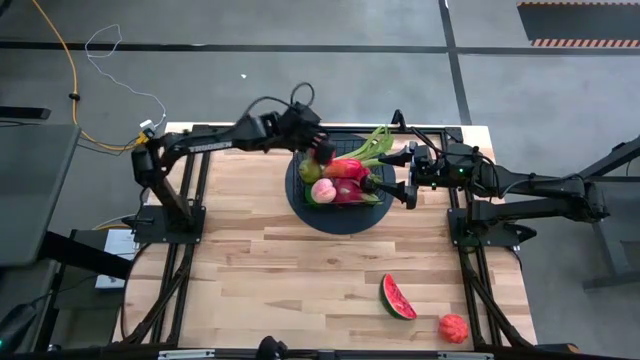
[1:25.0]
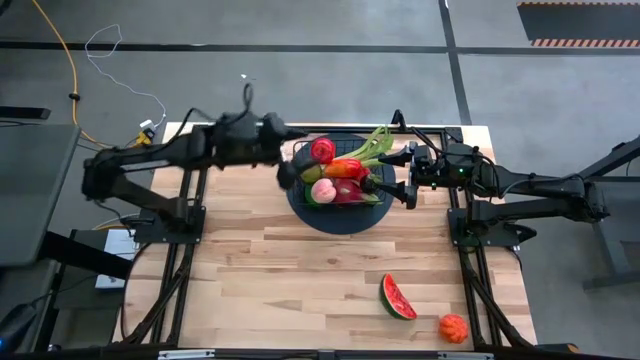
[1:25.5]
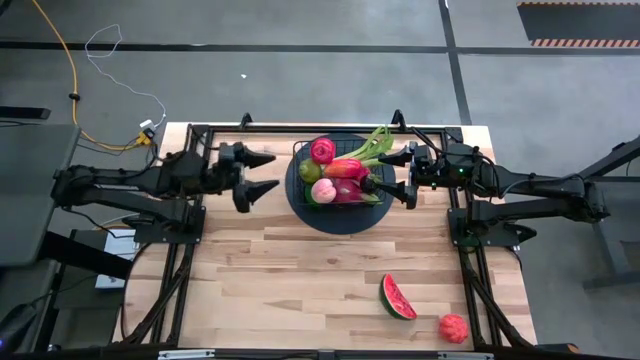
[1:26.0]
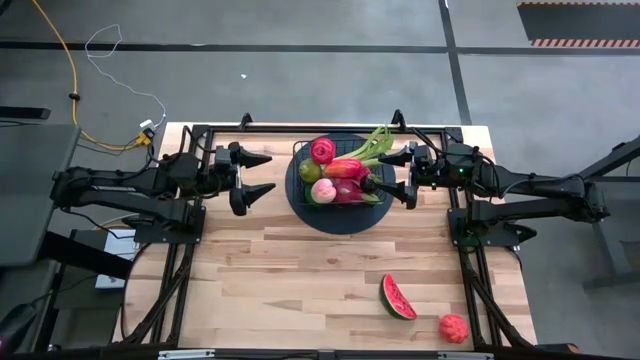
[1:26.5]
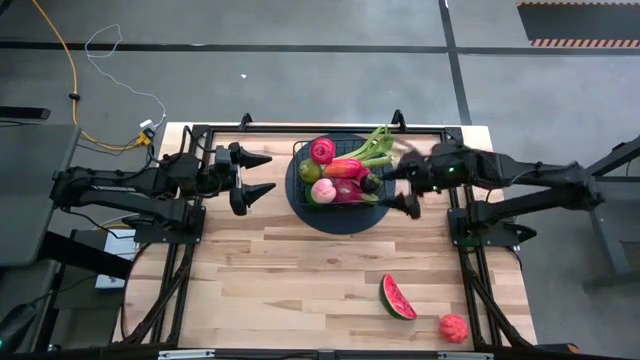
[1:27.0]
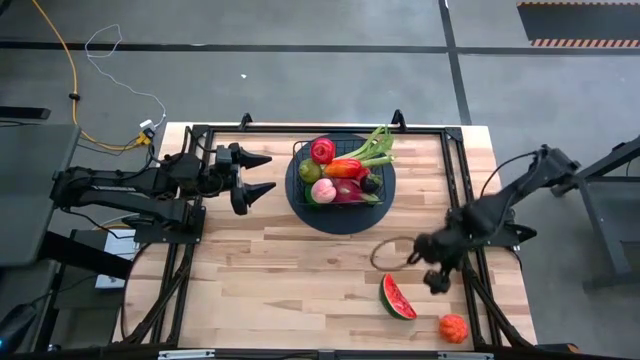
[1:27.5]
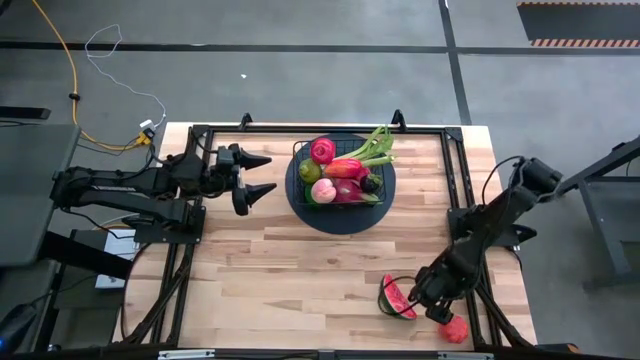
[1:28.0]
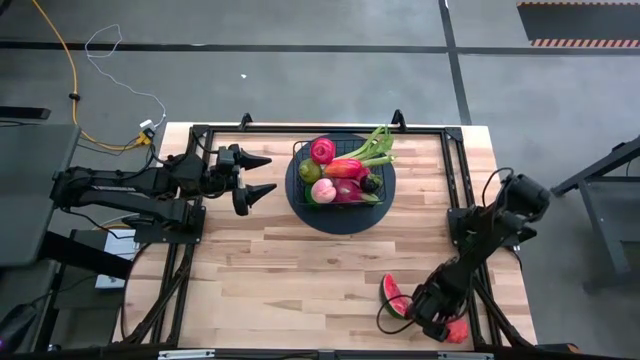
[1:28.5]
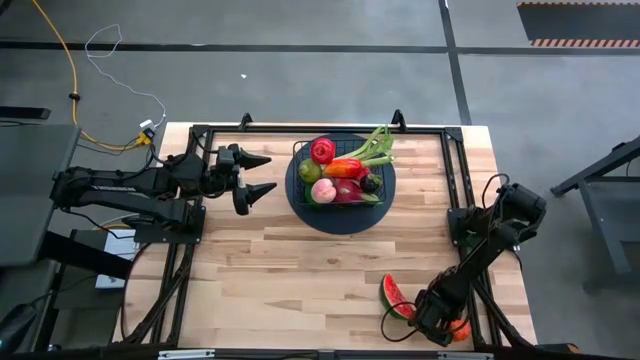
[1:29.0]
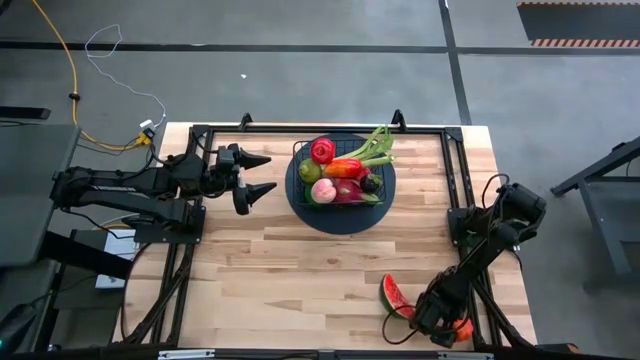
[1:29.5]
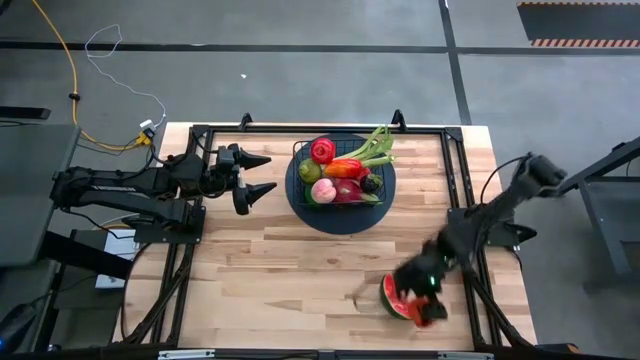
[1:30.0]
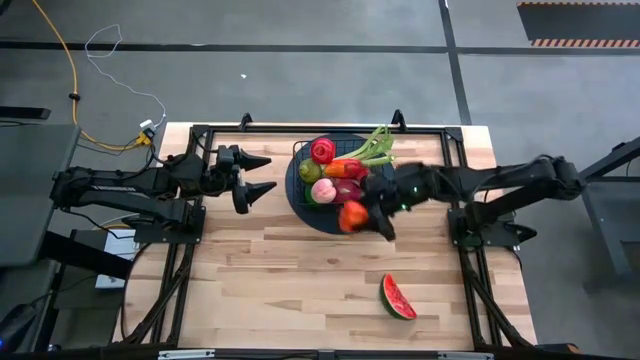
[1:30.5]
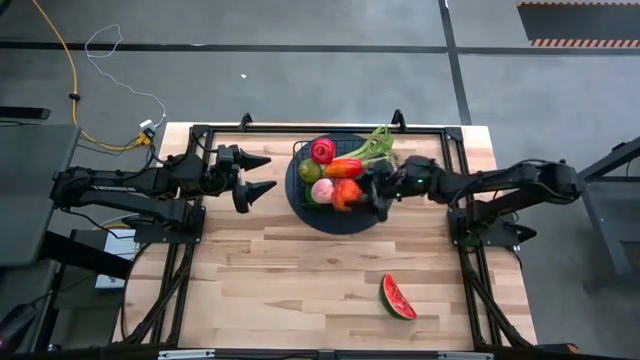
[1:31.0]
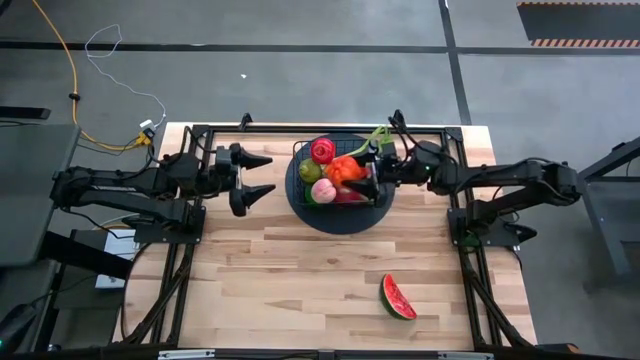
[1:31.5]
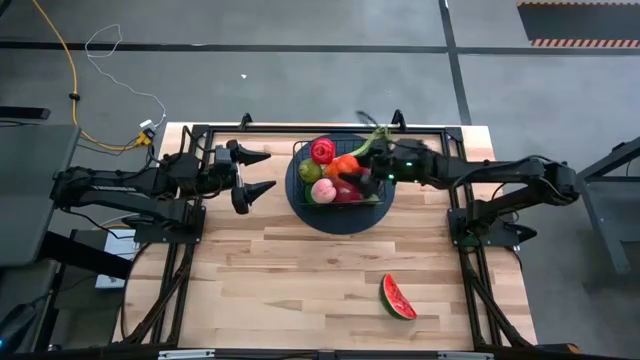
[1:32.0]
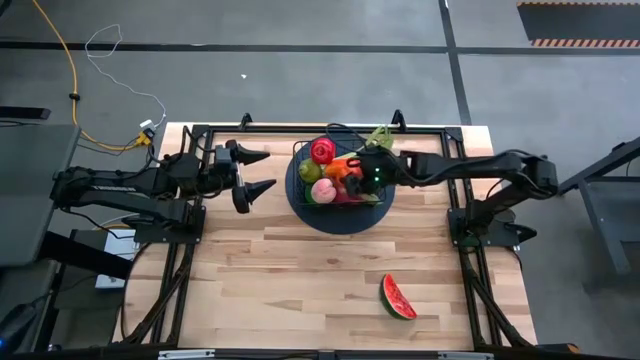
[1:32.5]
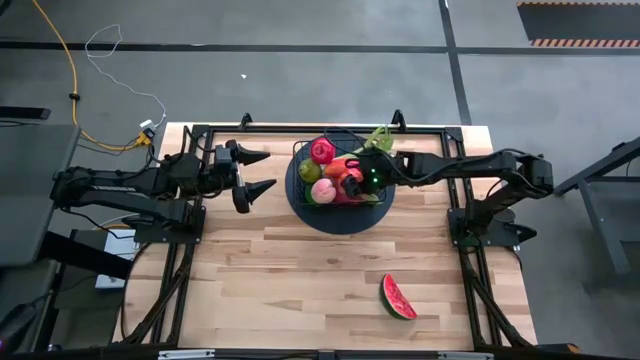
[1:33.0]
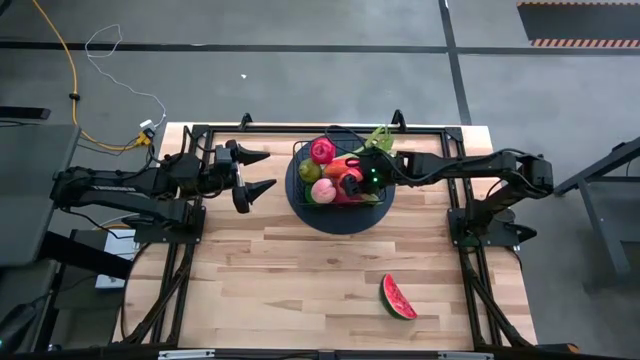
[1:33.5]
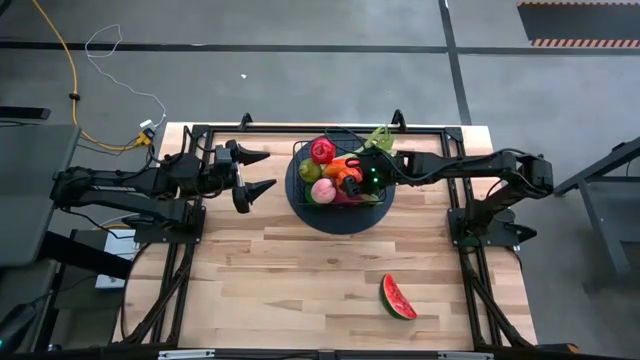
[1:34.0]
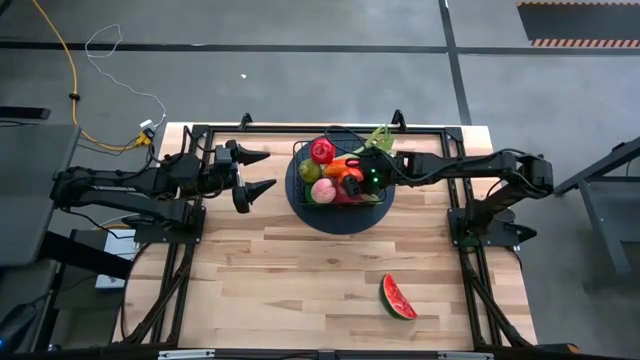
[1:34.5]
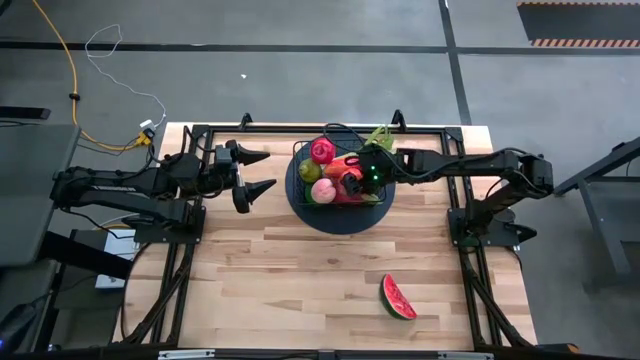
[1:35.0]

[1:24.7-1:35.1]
Task: Build produce basket
Put the pumpkin into the wire basket

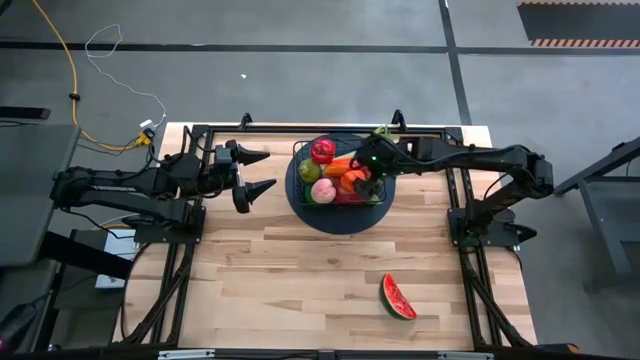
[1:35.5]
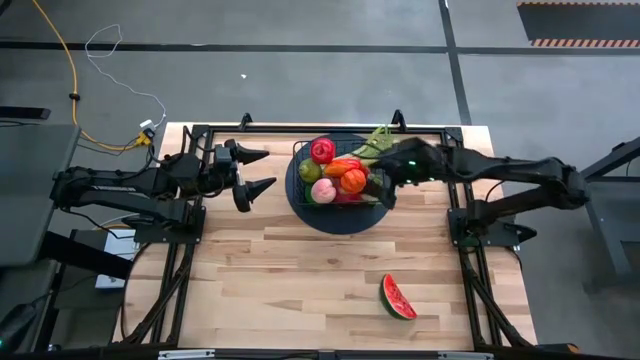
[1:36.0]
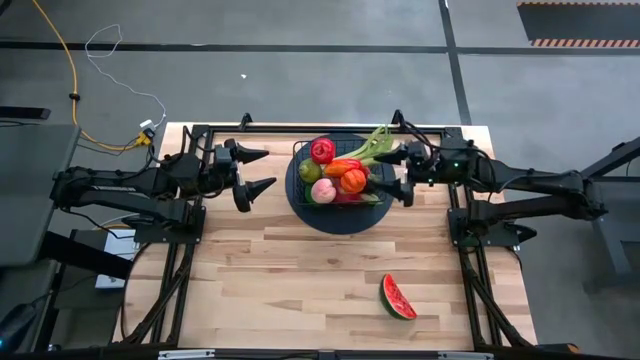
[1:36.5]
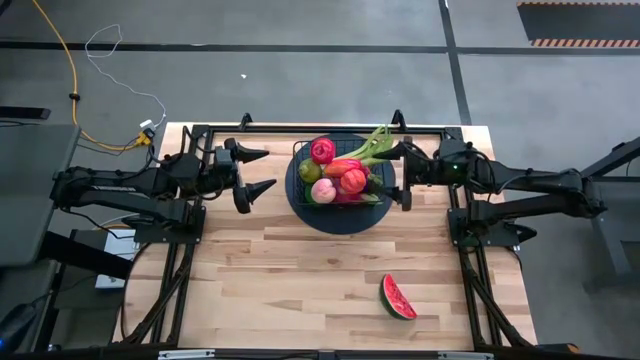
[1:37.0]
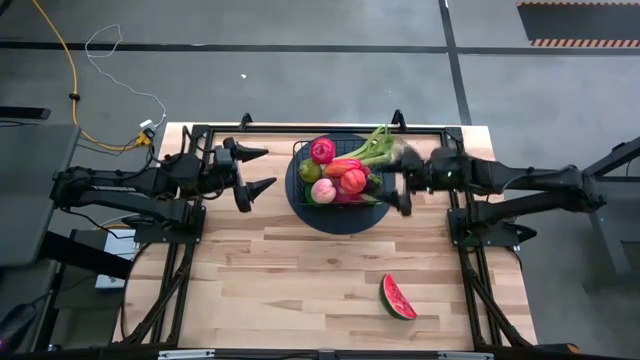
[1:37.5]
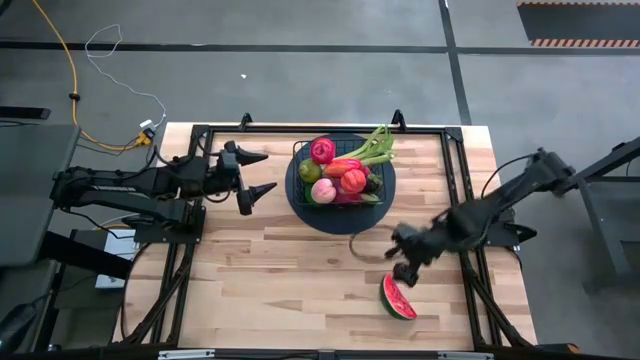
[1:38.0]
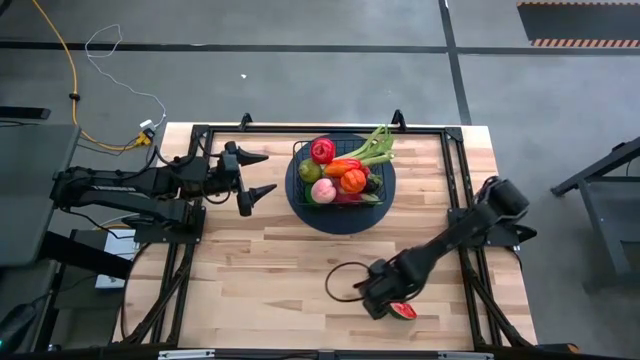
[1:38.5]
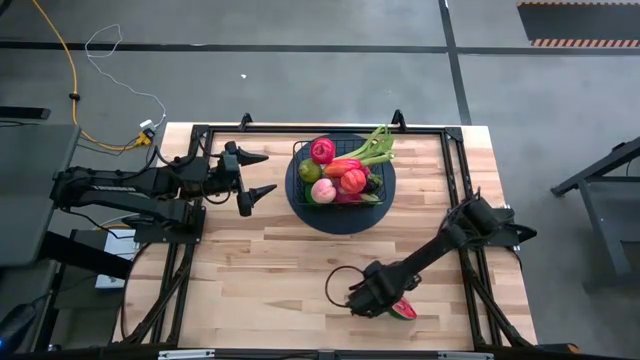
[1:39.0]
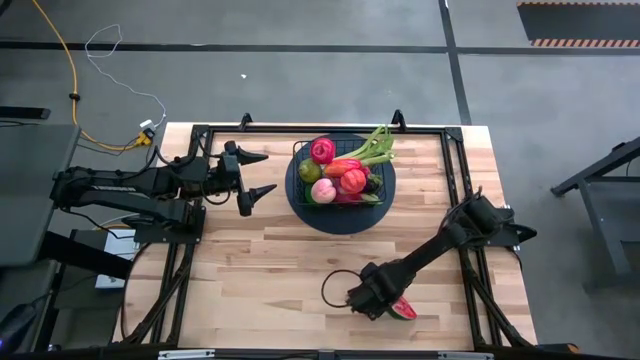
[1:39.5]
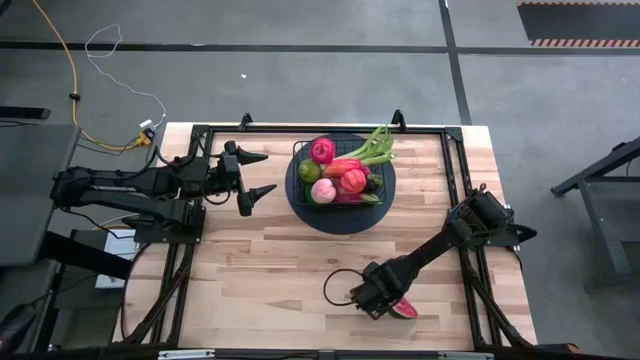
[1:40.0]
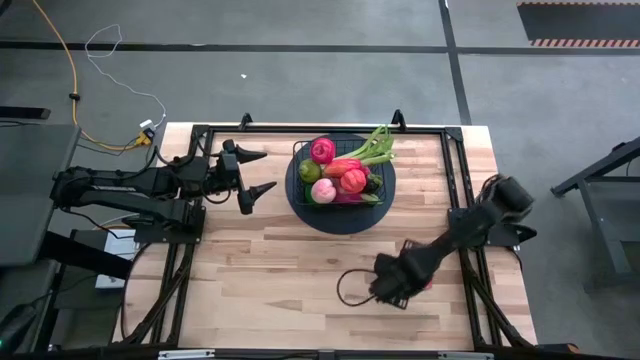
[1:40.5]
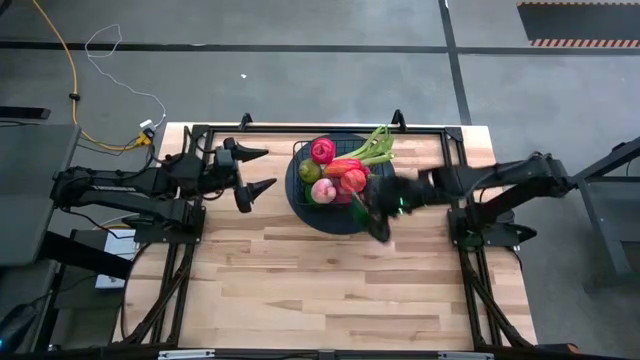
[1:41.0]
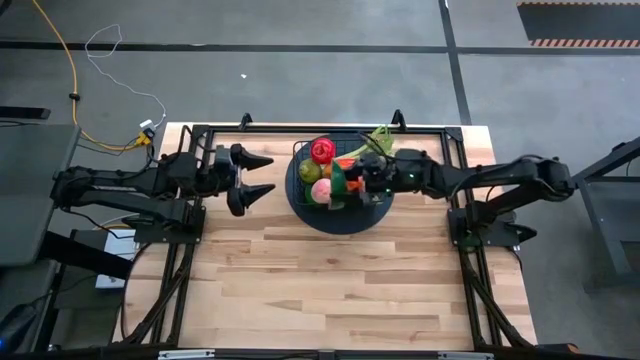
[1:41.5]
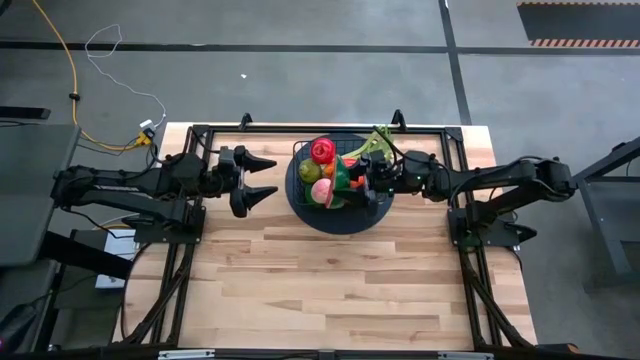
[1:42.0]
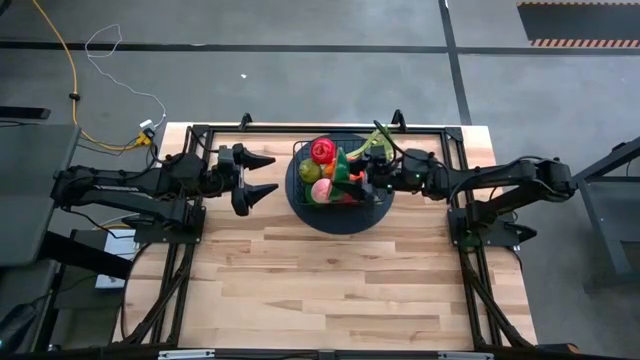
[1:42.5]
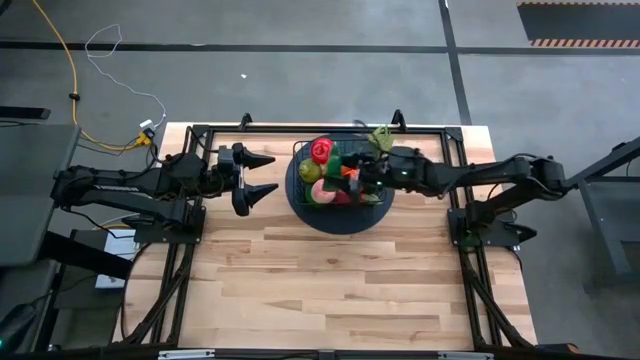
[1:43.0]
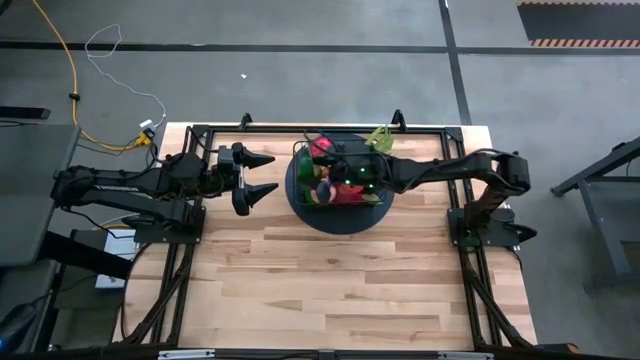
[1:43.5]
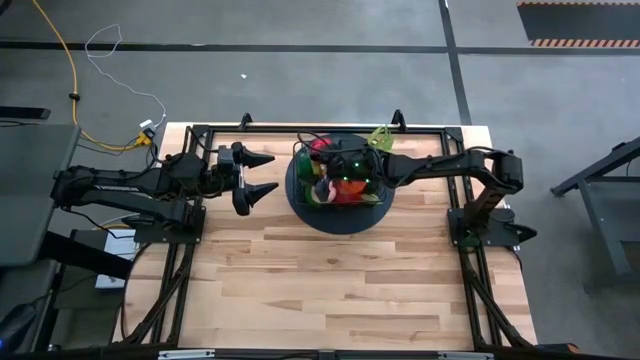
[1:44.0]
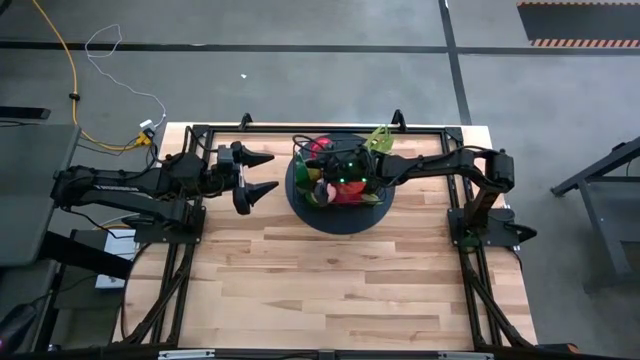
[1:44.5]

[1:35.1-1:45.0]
Put the watermelon into the wire basket

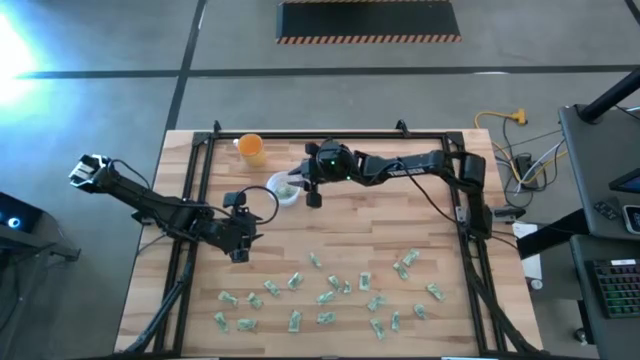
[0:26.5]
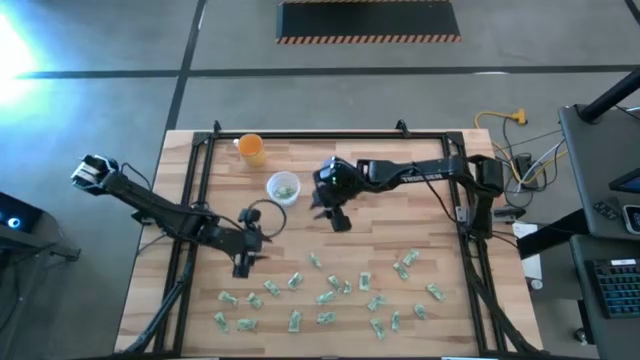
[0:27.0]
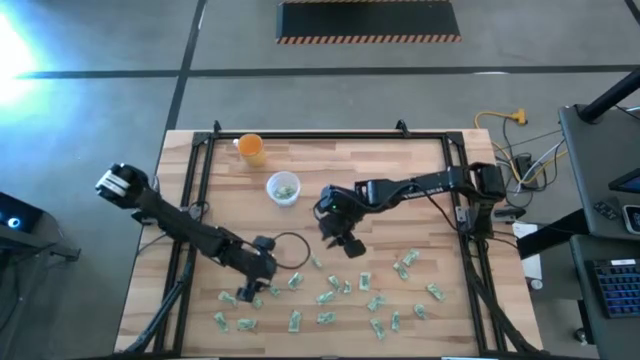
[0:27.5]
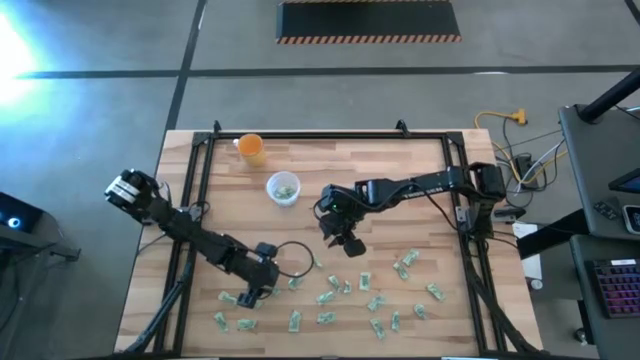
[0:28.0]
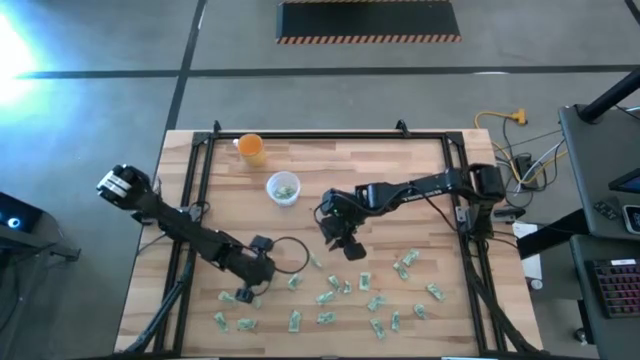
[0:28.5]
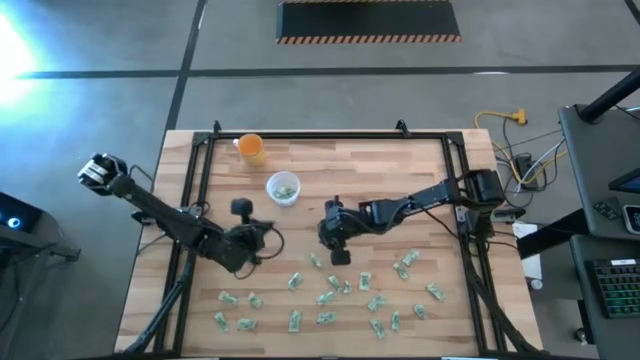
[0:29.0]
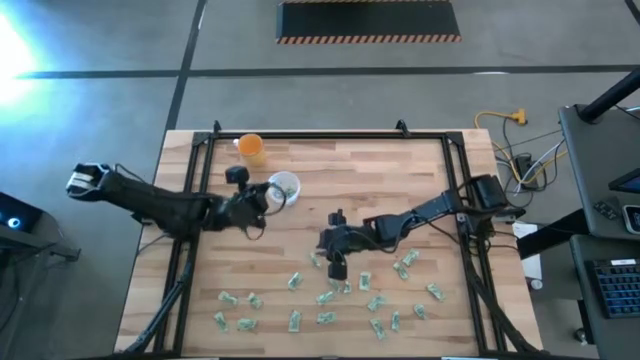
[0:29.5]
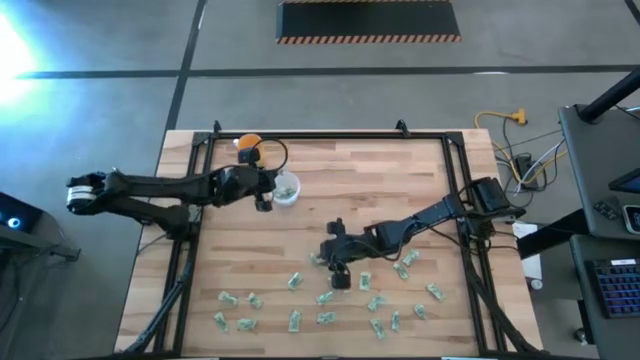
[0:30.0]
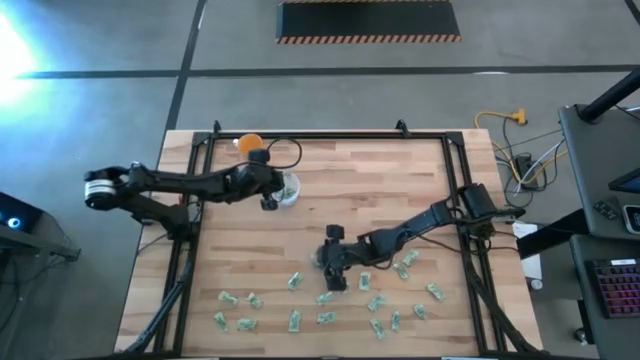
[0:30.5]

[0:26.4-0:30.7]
Task: Pick and place Stevia / Truvia into bins
Put the stevia packet into the transparent container
